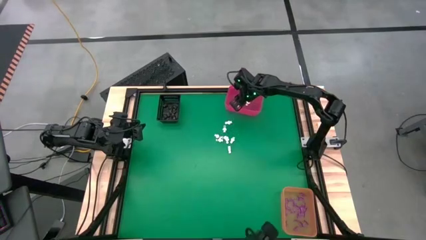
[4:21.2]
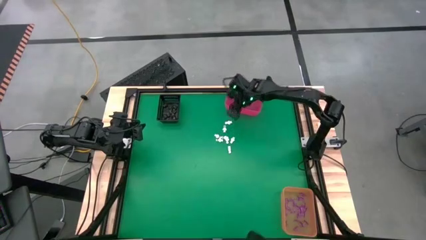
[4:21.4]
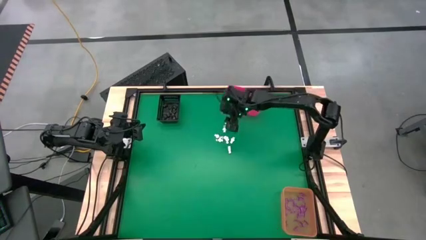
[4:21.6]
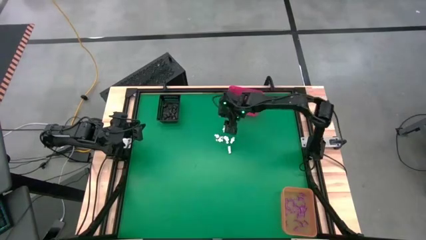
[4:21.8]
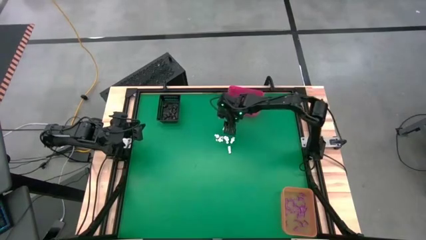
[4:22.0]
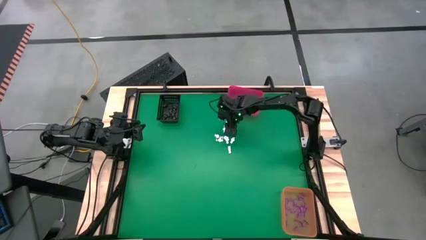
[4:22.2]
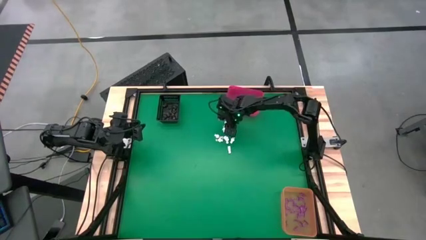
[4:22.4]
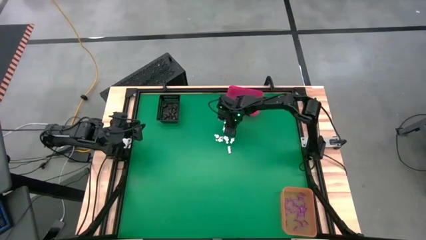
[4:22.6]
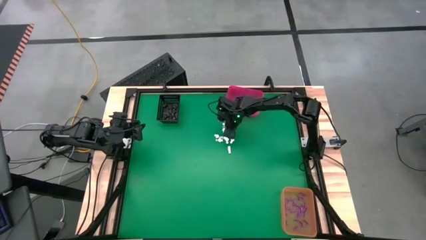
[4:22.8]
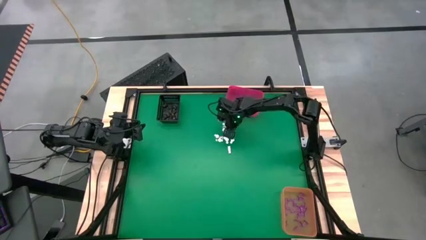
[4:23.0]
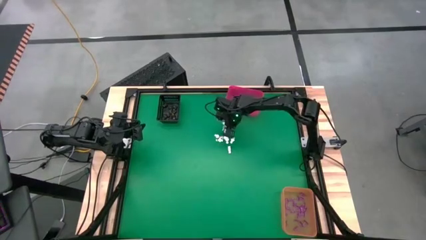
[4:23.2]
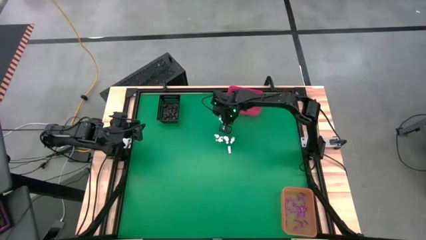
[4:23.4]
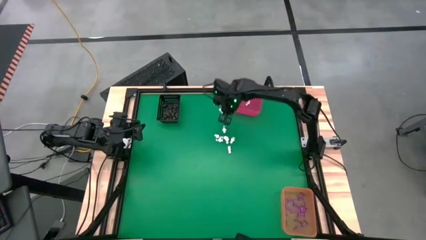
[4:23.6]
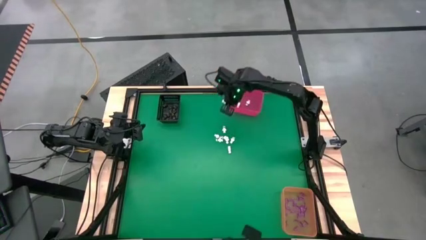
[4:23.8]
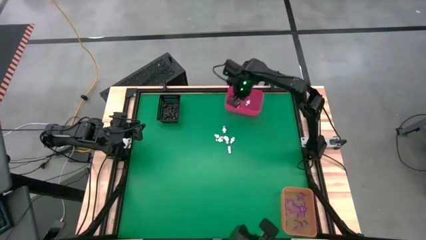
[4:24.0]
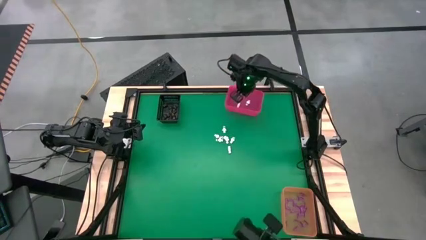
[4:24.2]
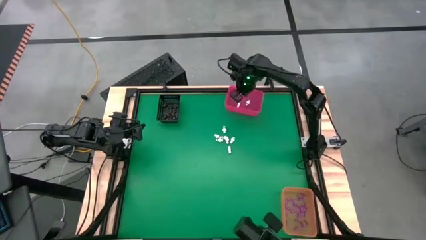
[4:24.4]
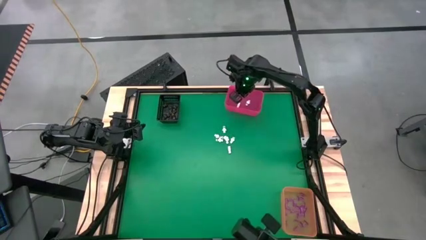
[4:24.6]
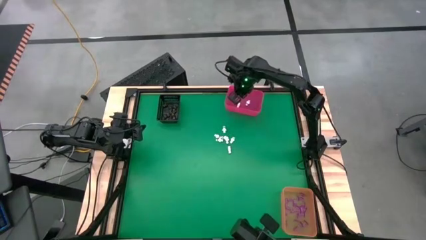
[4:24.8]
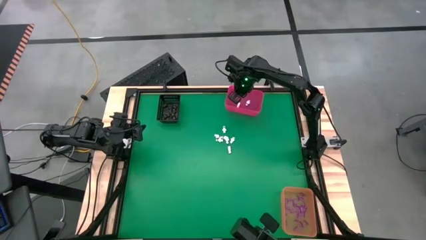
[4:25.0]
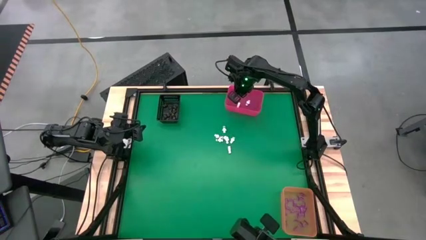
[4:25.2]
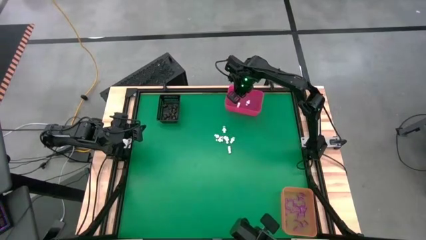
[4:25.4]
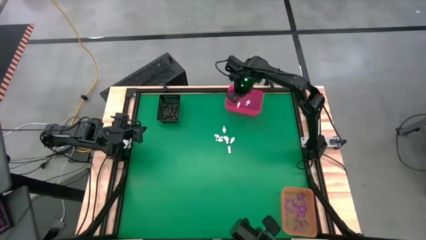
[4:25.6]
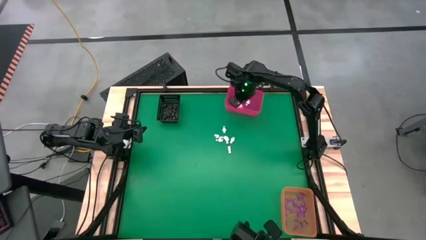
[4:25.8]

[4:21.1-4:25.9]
Task: Sort Halloween decoration
Put the white skeleton toy into the pink bin

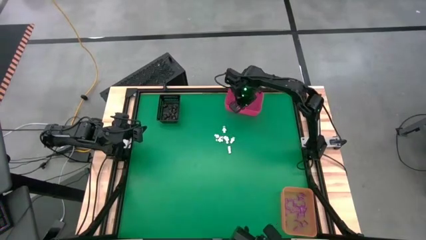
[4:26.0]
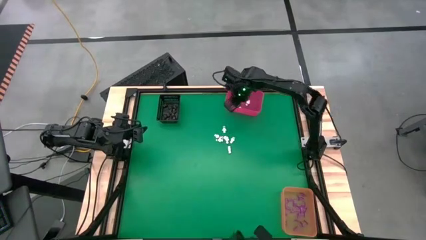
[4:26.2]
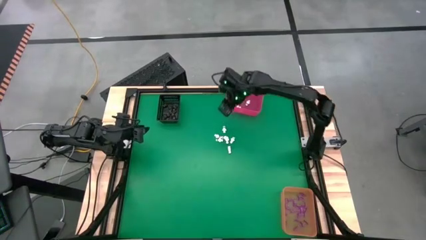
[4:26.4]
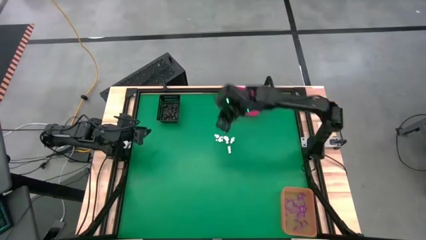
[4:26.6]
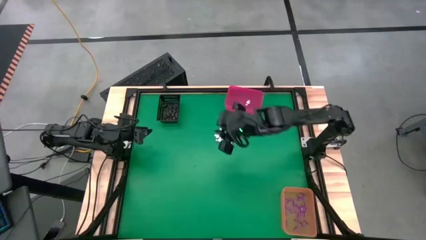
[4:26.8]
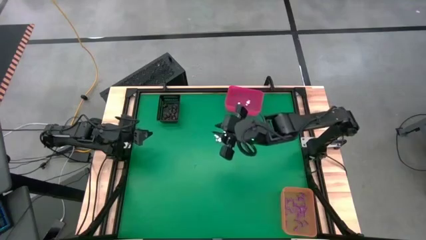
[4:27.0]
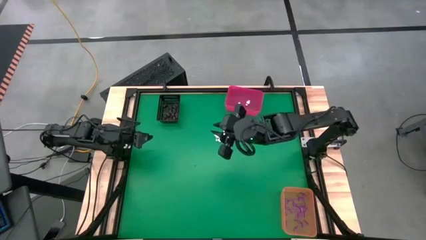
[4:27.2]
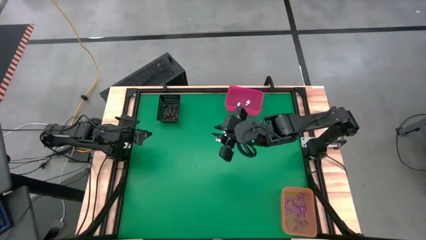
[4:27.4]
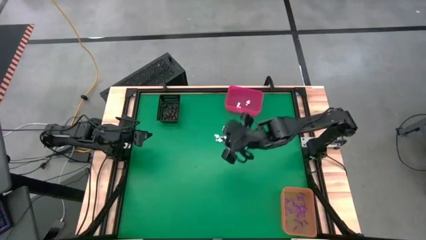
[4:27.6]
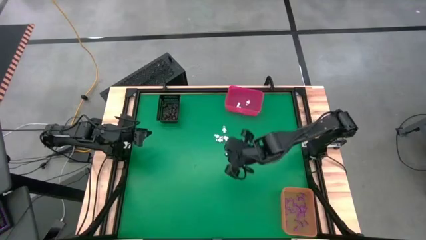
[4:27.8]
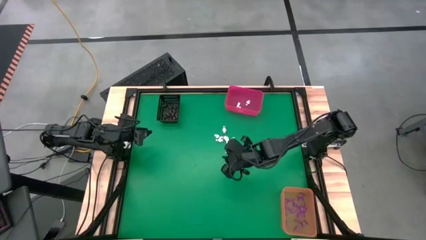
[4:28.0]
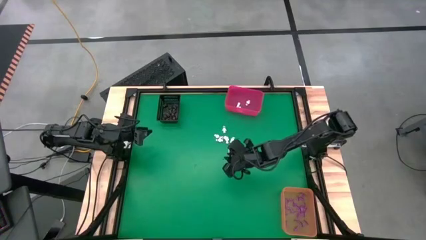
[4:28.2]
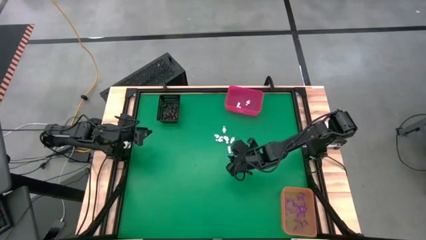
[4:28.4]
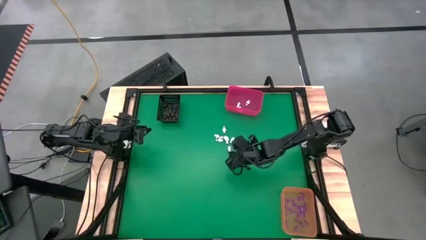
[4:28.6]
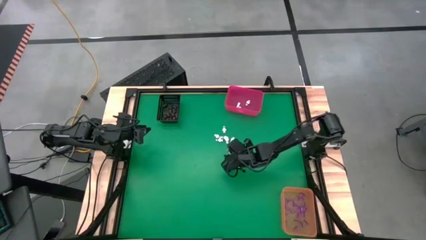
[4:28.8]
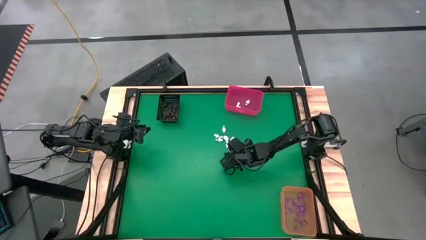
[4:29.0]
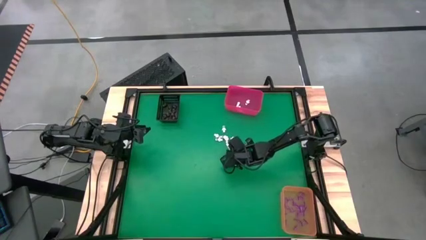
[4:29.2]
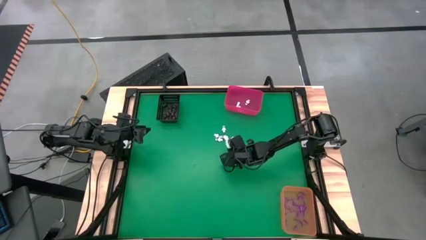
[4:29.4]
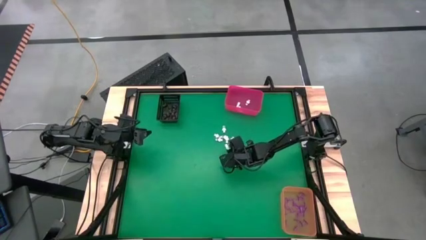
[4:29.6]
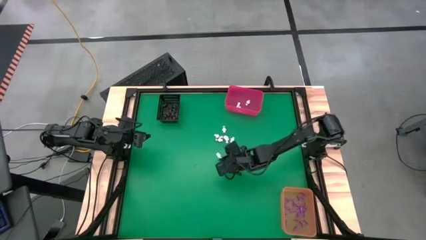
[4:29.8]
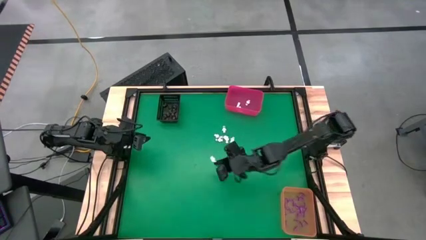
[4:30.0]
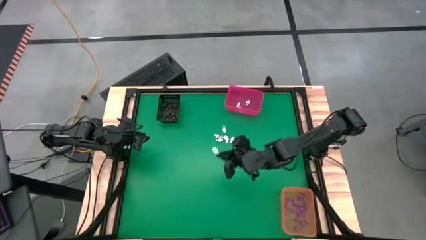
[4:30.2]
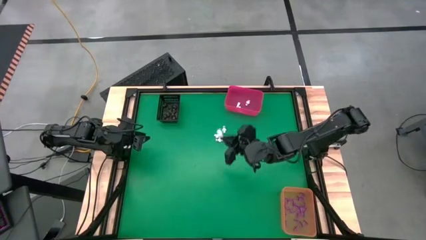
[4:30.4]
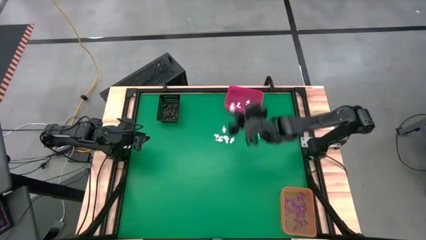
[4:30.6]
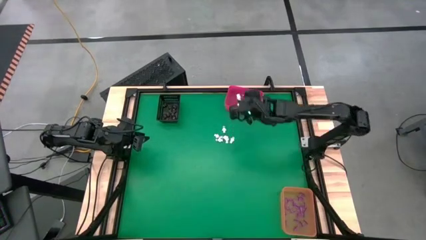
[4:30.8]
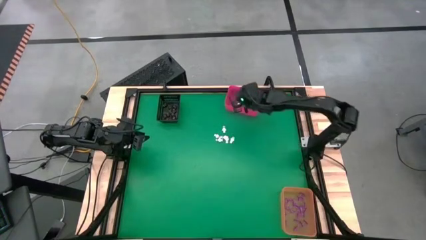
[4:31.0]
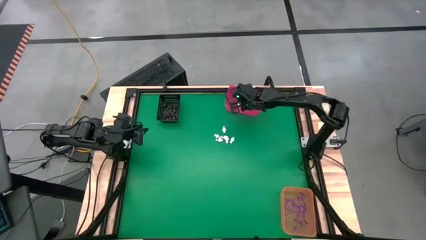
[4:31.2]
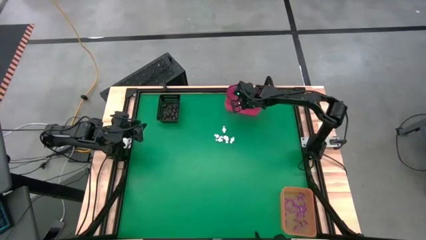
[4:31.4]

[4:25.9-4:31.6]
Put the white skeleton toy into the pink bin

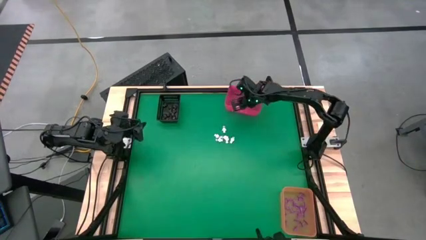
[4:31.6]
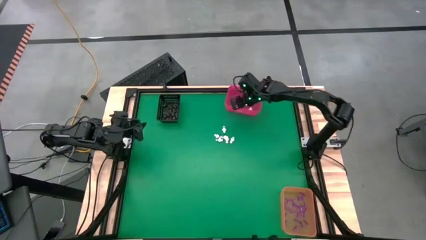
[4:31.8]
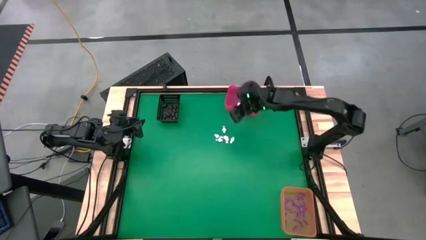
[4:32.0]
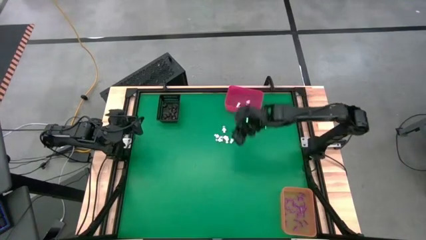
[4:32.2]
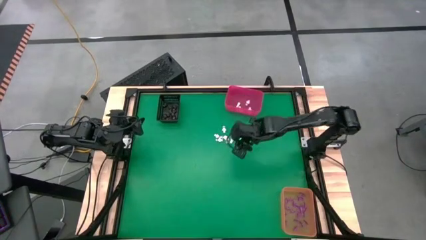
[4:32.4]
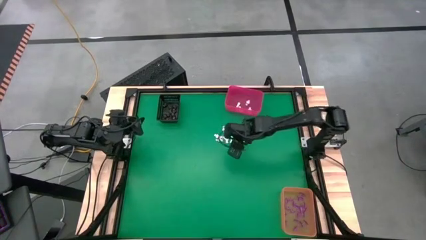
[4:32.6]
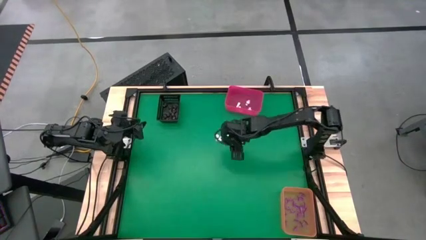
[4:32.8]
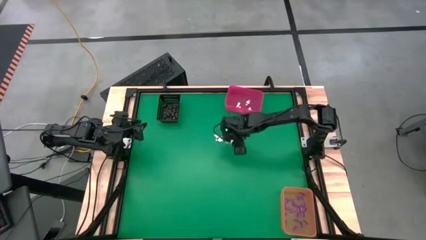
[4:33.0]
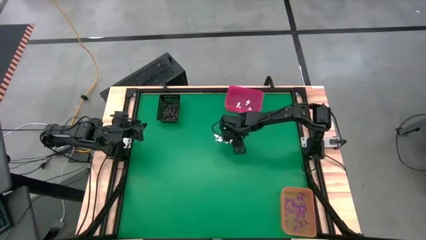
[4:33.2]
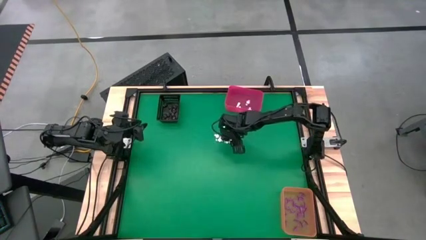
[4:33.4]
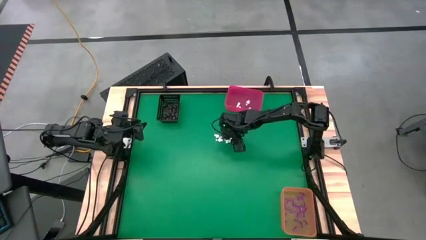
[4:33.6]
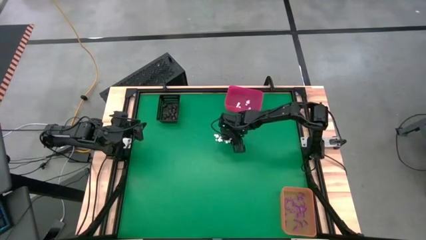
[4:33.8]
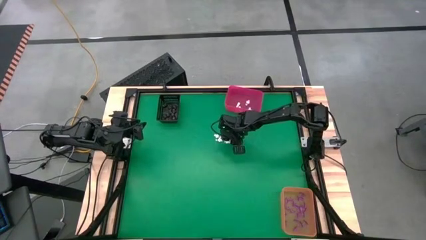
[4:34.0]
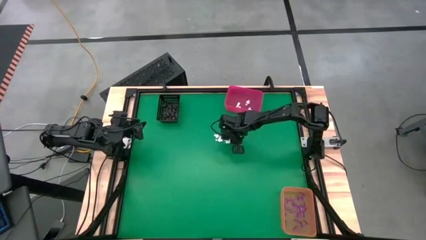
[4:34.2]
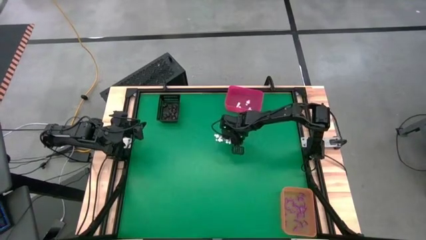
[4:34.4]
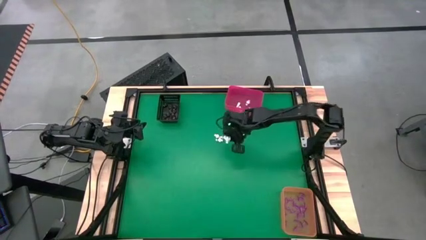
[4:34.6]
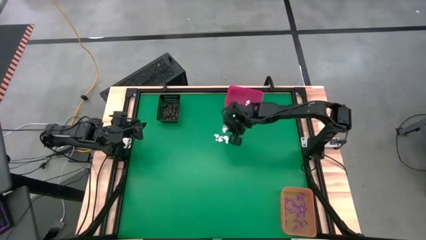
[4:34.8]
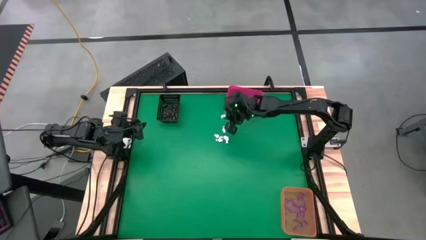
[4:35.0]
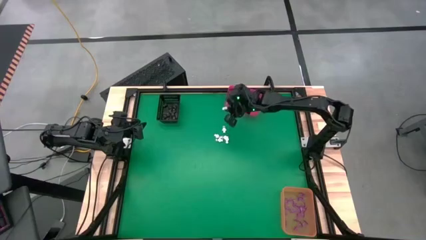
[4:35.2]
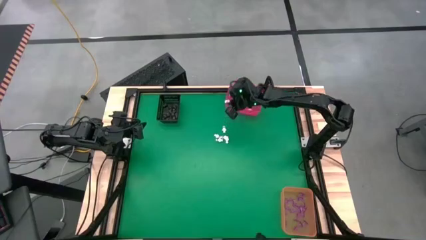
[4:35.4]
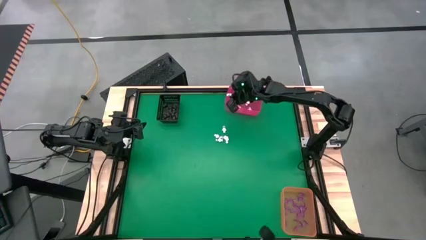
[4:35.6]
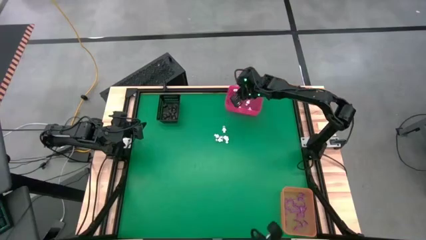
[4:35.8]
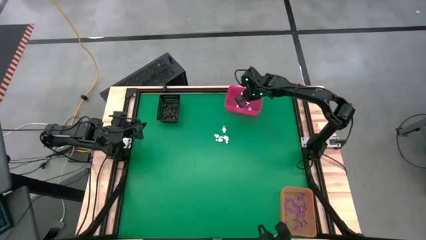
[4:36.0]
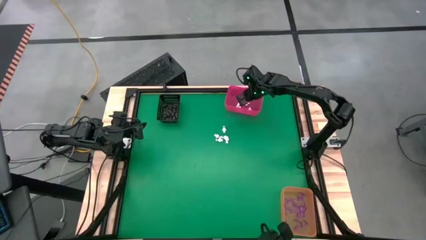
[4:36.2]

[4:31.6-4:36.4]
Put the white skeleton toy into the pink bin

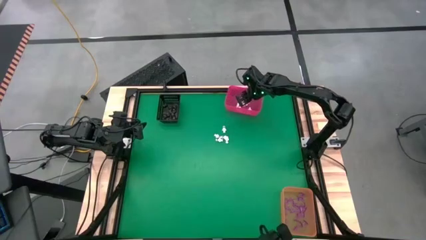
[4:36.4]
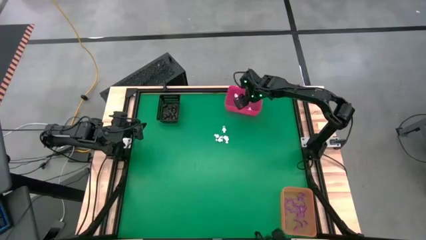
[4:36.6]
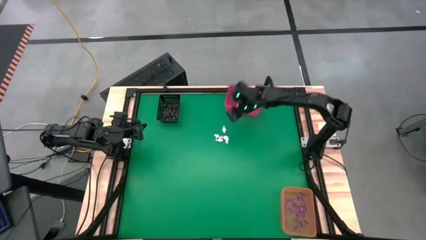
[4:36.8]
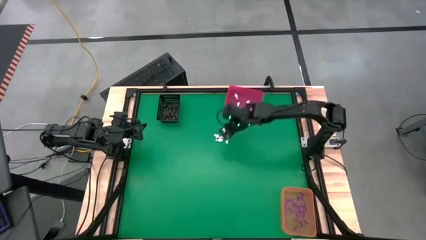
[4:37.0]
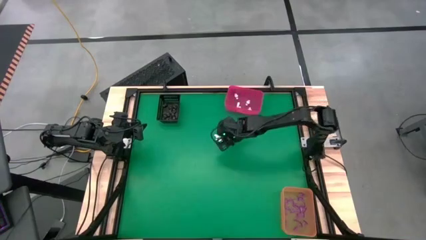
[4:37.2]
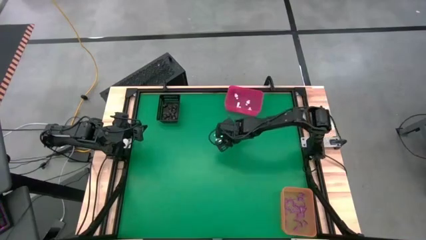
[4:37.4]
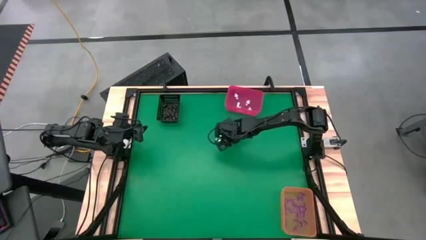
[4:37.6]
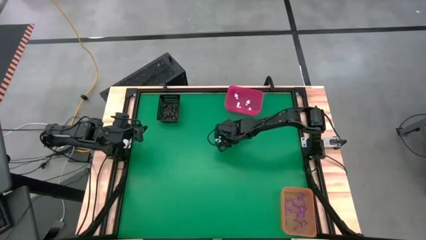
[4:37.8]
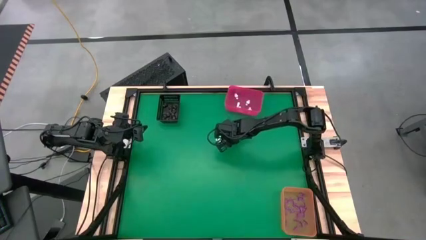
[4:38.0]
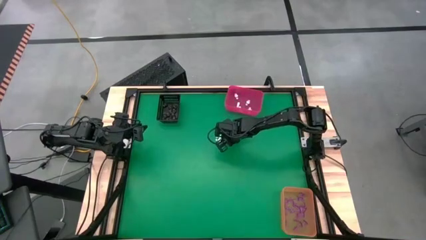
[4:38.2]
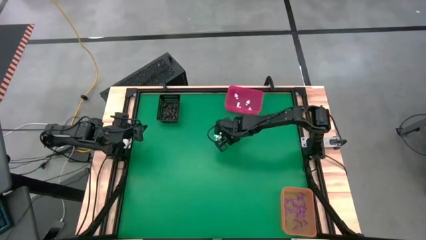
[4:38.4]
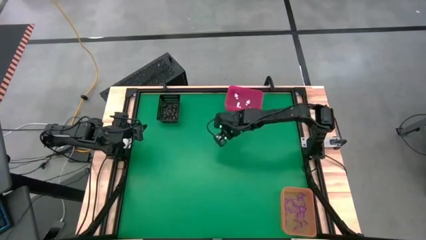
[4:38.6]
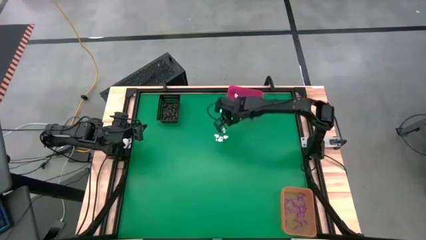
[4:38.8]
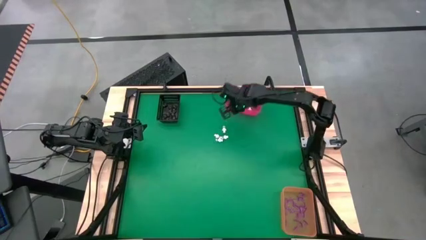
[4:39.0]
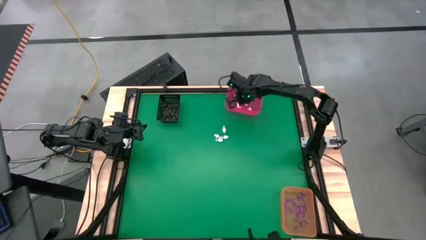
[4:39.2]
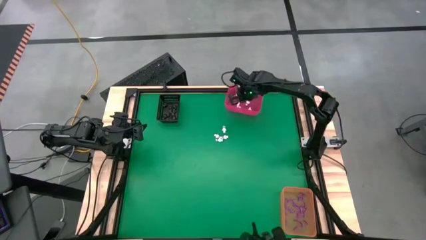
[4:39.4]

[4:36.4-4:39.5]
Put the white skeleton toy into the pink bin
